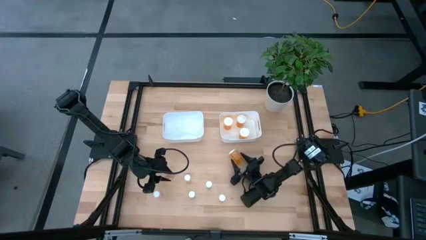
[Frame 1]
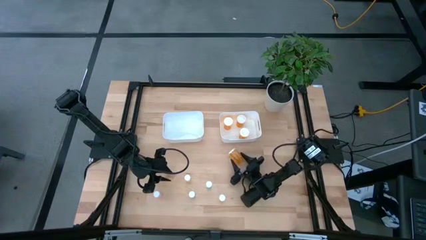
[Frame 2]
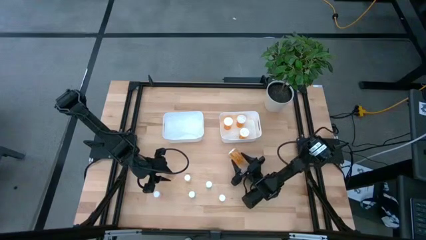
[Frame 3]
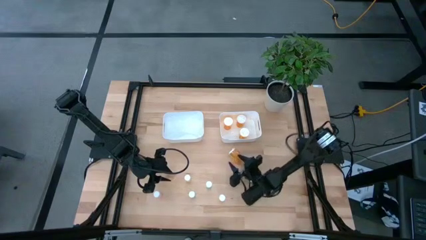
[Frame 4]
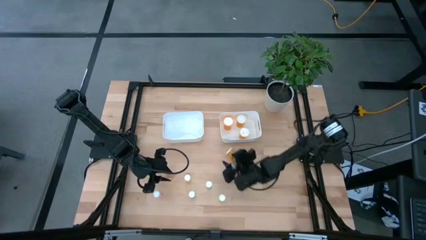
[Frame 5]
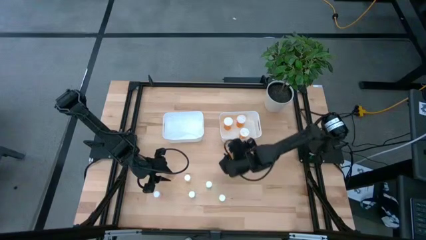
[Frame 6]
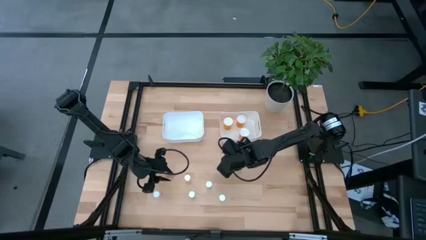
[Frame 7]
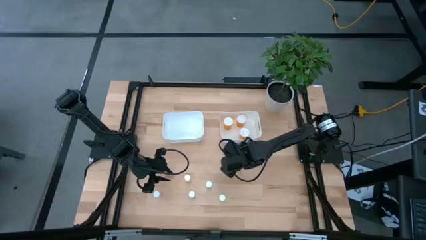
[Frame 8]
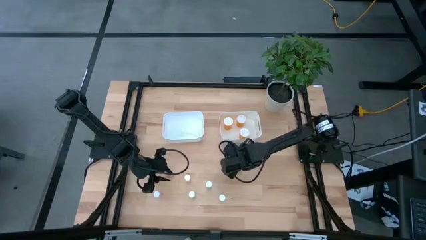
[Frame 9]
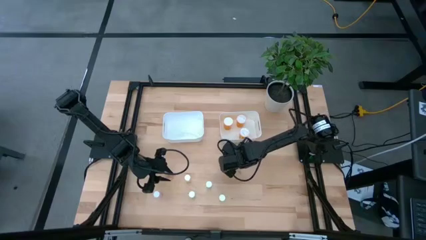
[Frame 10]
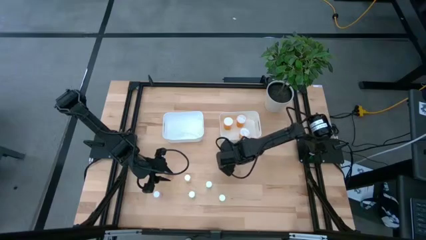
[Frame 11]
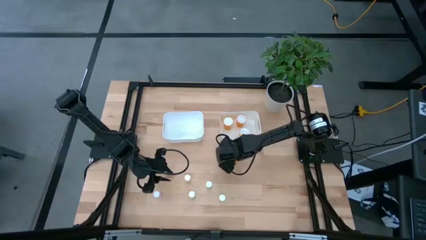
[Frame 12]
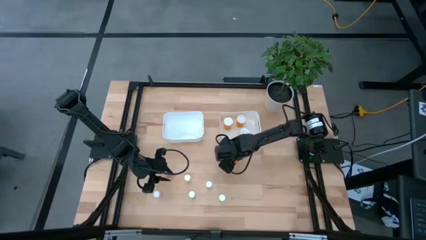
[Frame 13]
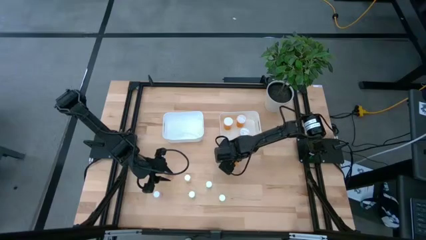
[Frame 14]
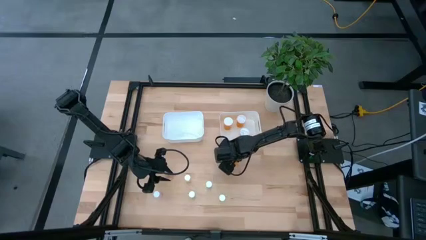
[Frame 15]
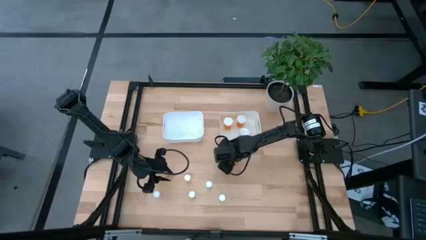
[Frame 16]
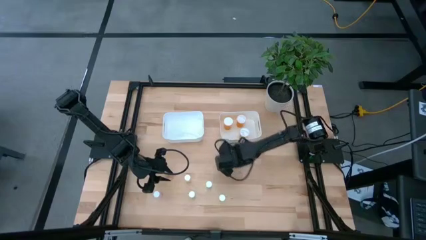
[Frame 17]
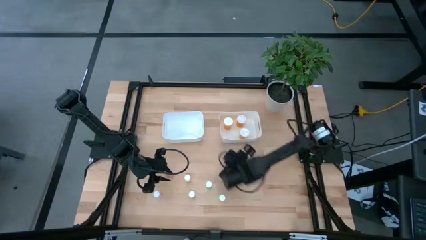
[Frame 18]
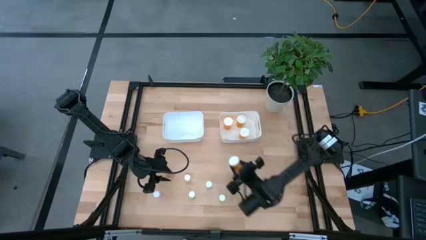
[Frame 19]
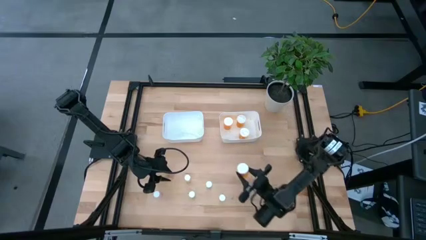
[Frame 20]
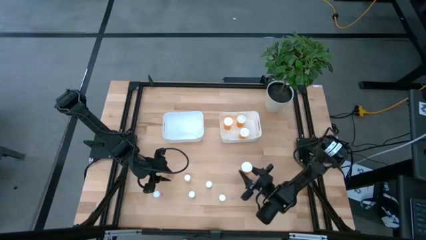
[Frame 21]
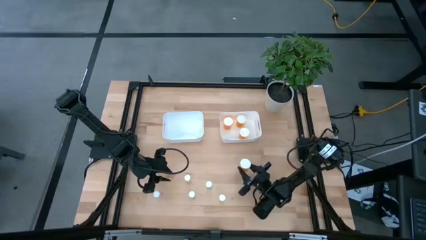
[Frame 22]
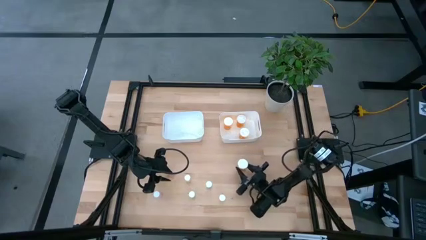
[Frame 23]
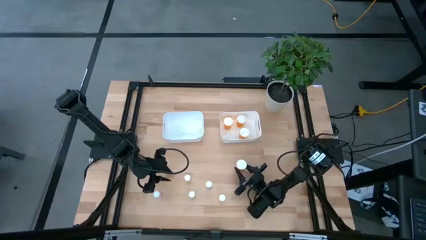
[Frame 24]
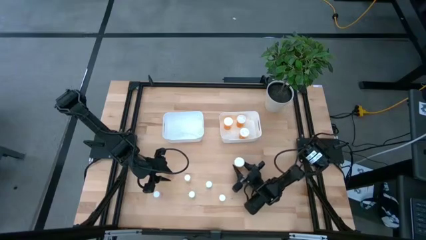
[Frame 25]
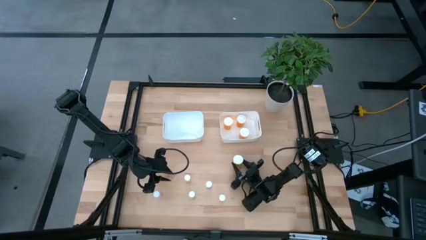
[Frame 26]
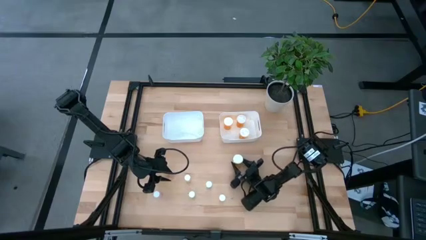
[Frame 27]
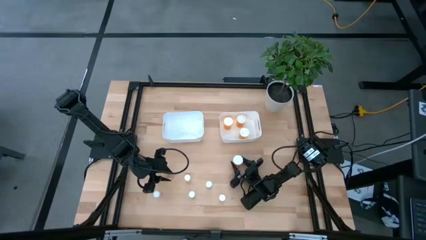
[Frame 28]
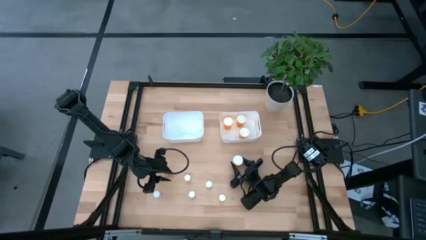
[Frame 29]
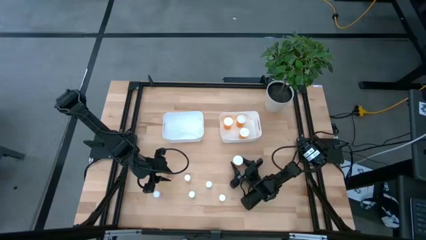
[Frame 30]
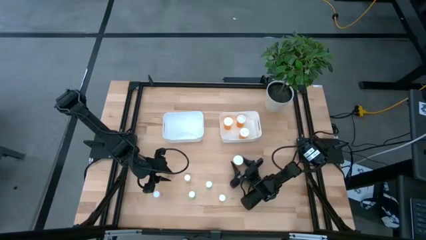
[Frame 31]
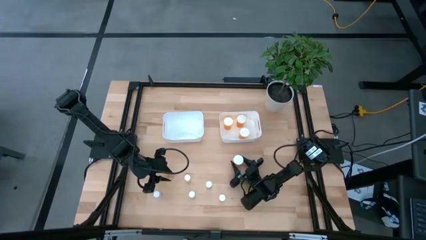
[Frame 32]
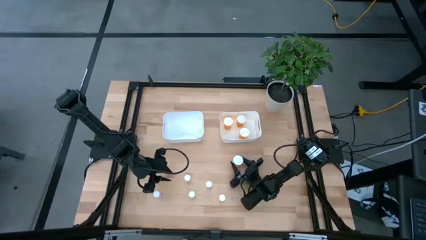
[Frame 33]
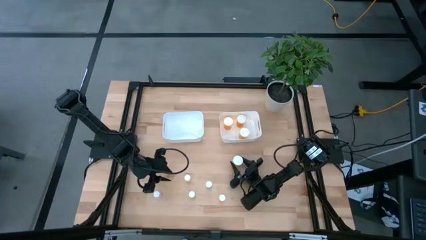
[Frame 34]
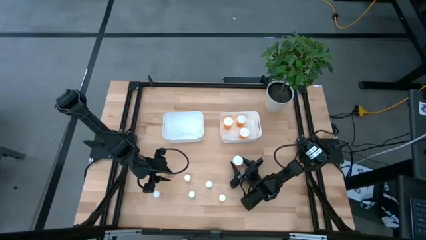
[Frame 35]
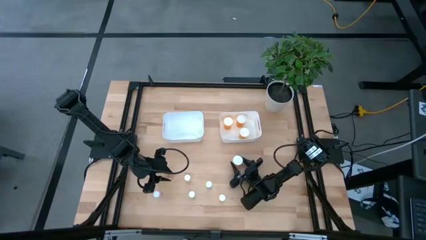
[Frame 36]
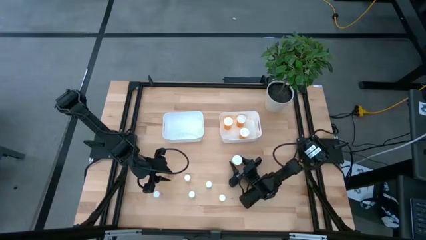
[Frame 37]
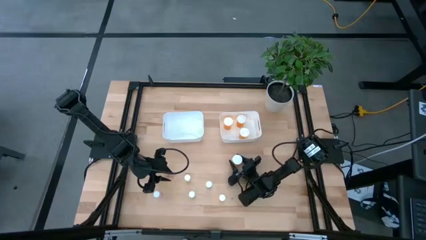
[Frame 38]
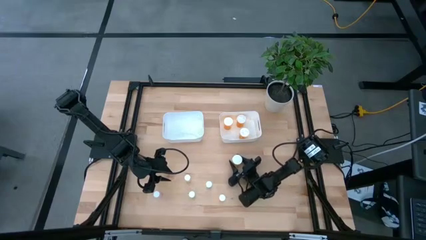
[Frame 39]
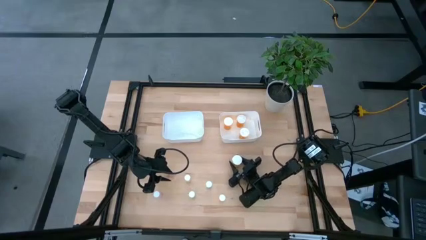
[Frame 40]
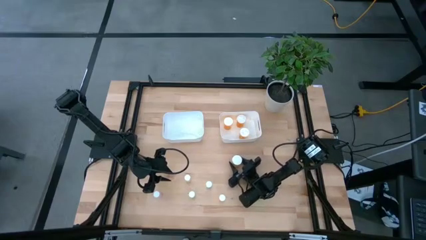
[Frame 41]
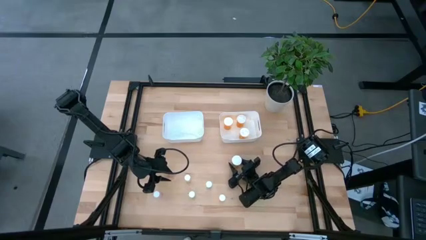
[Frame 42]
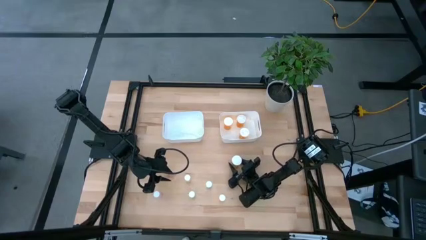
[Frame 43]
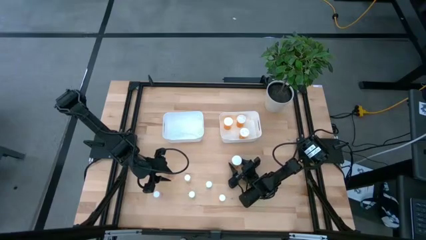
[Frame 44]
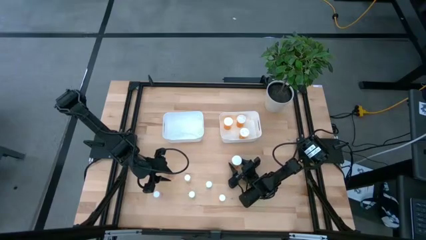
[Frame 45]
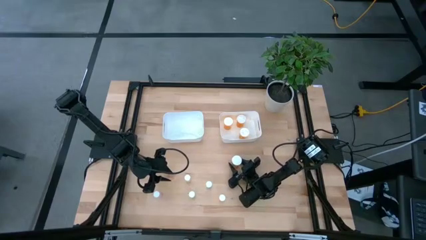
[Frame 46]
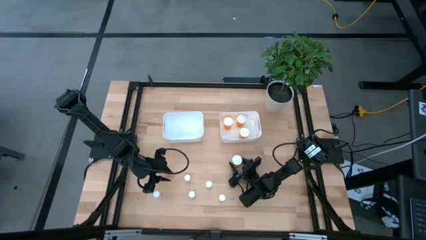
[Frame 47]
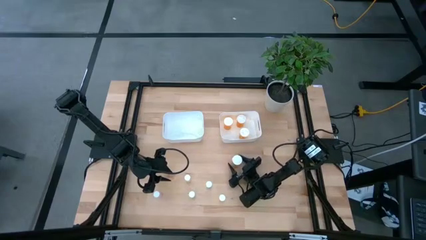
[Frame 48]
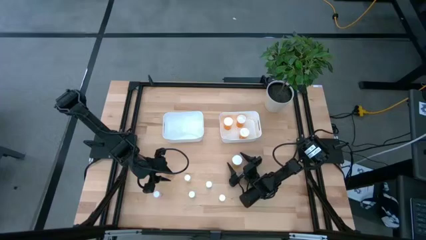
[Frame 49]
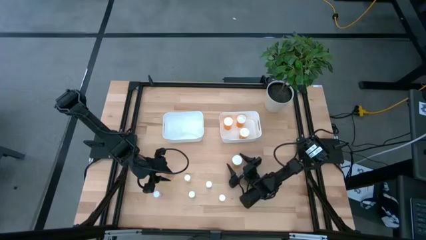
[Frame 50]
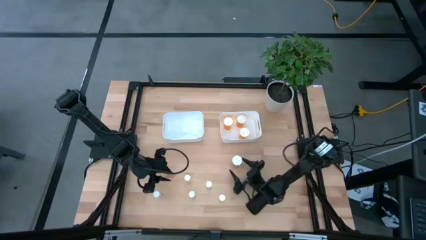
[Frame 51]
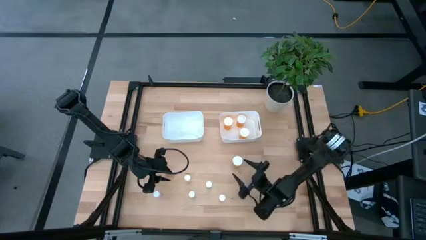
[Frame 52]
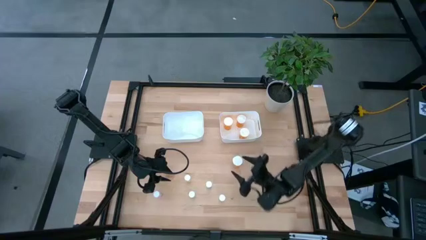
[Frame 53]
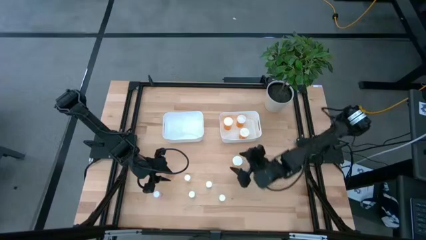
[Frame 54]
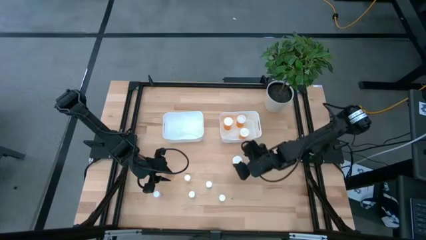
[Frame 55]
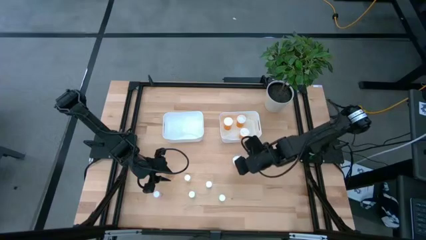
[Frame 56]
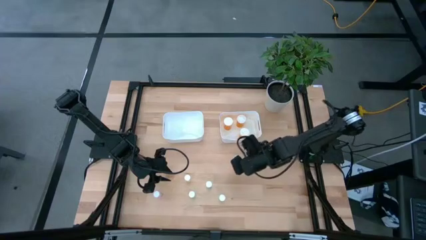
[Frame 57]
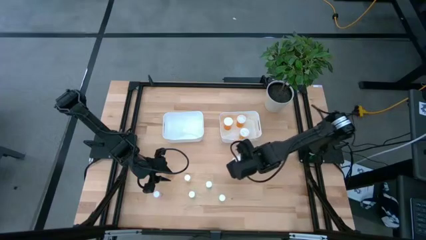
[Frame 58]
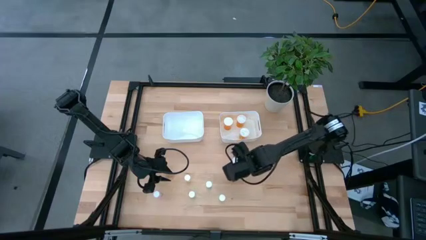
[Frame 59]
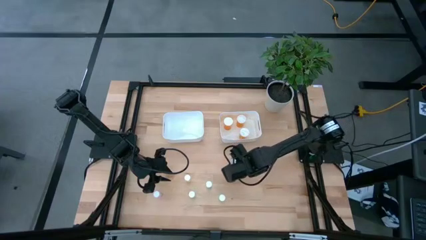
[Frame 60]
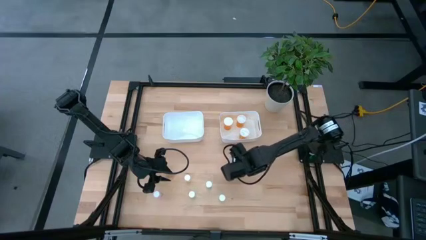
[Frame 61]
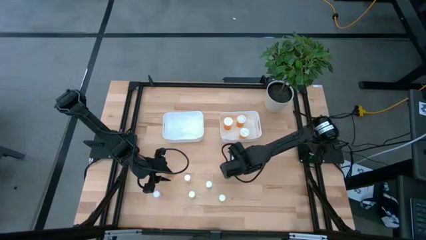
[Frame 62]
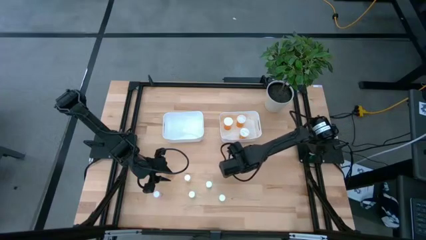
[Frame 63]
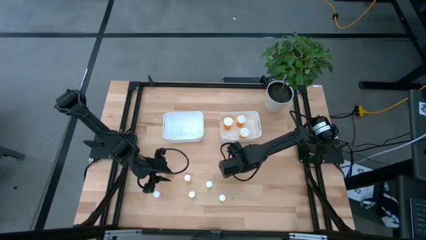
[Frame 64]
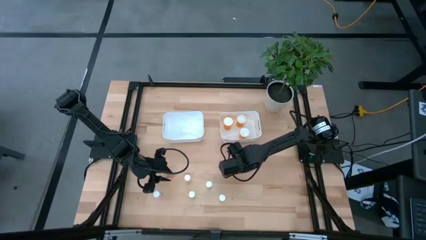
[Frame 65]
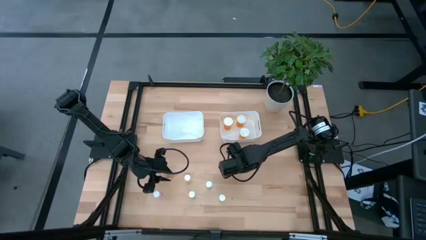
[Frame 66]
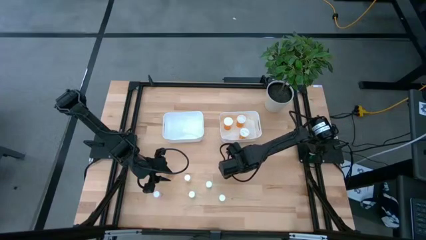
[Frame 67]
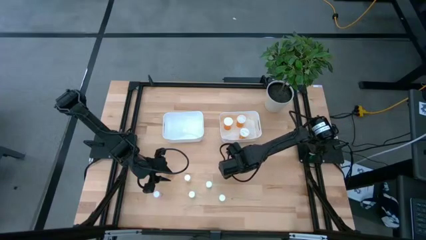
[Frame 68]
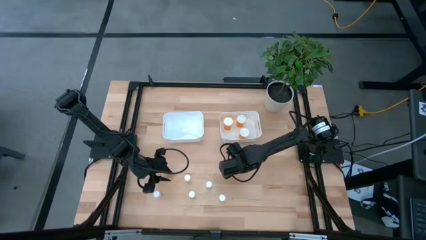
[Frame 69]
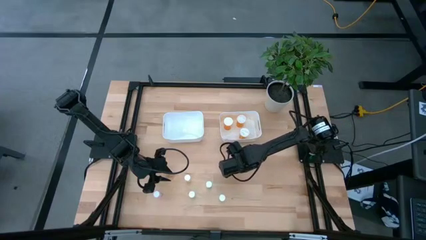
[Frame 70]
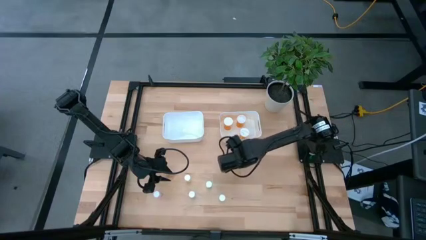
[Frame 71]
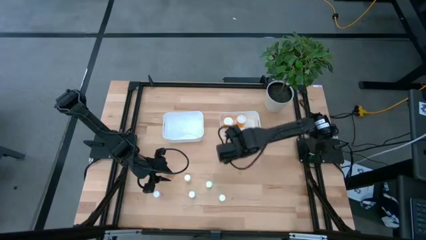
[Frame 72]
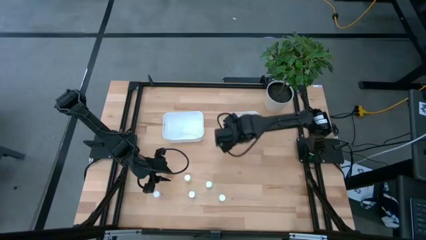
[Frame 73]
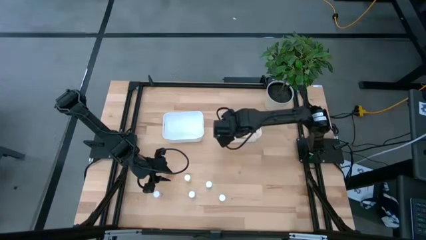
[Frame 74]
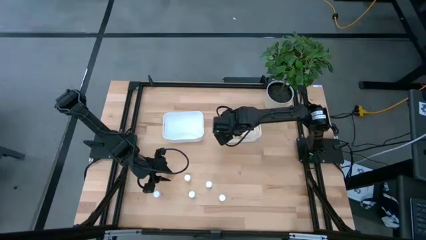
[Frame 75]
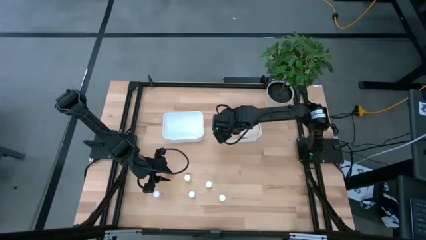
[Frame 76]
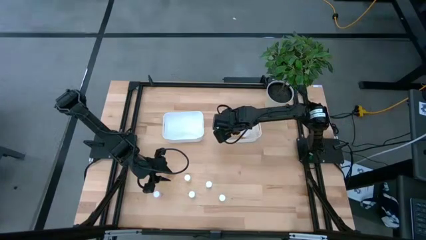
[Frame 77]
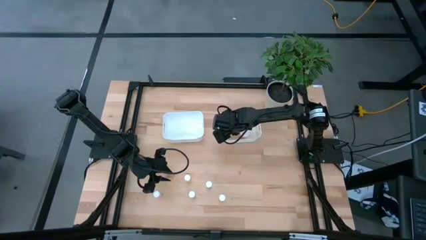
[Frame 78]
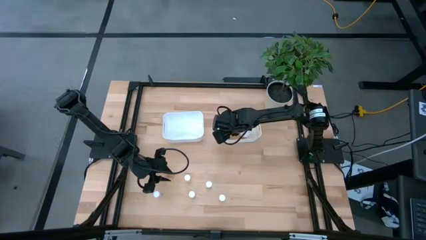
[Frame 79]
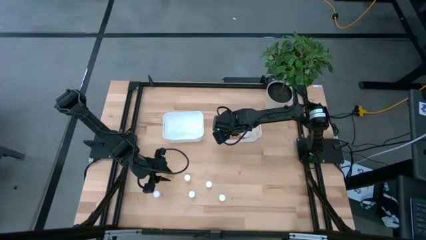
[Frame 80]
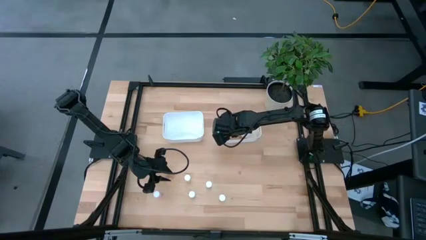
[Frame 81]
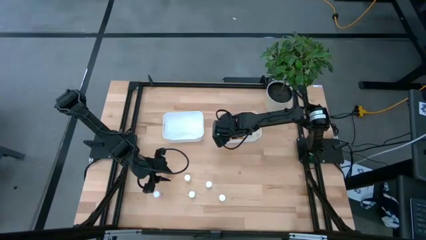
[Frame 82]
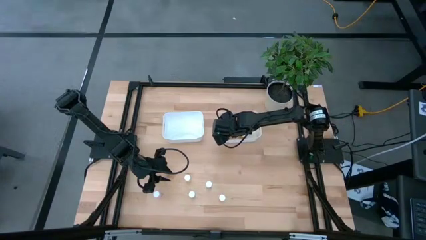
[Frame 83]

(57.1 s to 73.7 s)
Task: Pick and place medicine bottles into bin by pill shape (circle, oval)
Put the orange pill bottle into the right white bin
